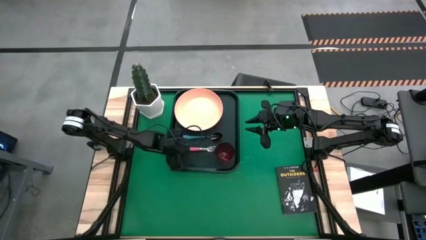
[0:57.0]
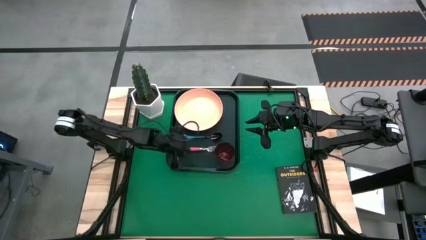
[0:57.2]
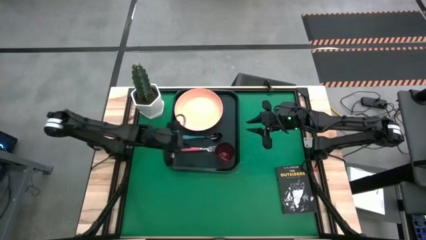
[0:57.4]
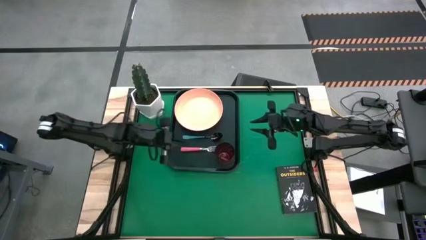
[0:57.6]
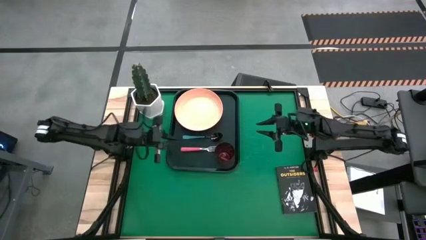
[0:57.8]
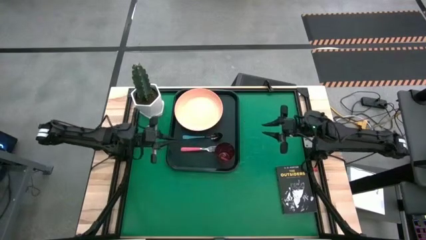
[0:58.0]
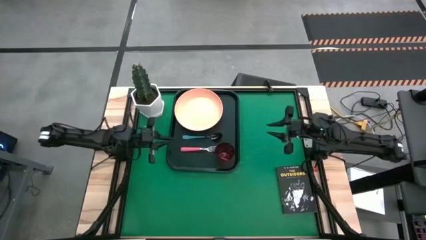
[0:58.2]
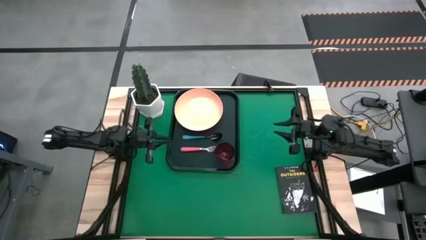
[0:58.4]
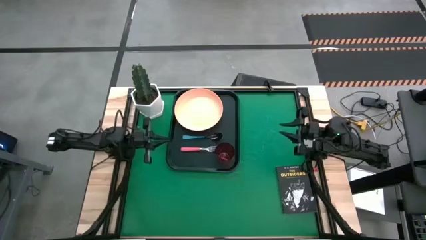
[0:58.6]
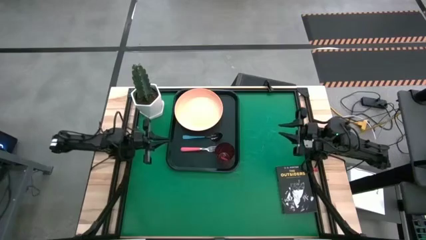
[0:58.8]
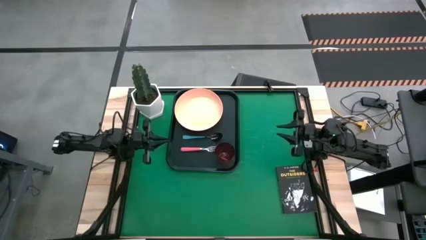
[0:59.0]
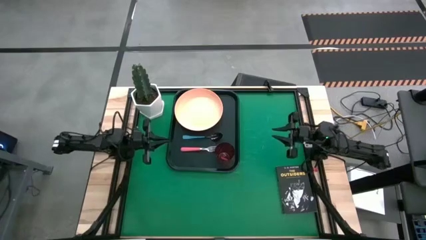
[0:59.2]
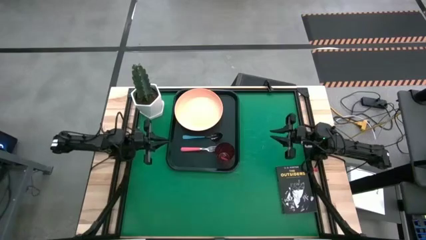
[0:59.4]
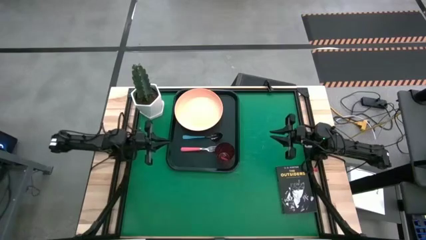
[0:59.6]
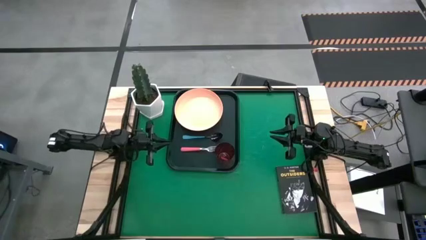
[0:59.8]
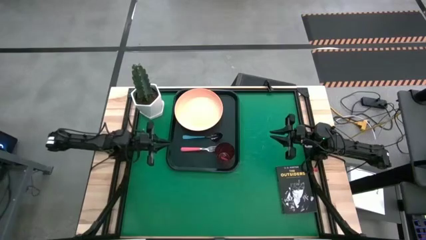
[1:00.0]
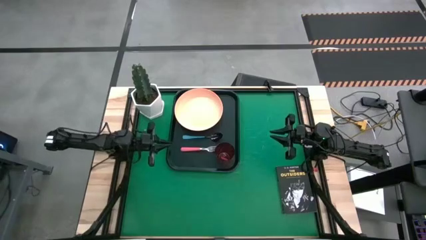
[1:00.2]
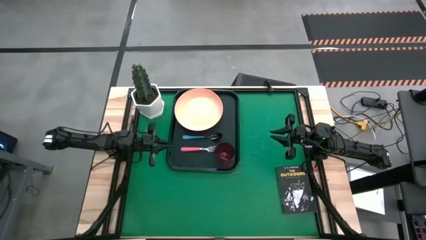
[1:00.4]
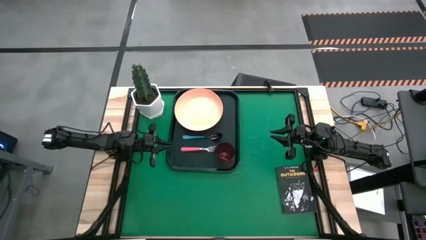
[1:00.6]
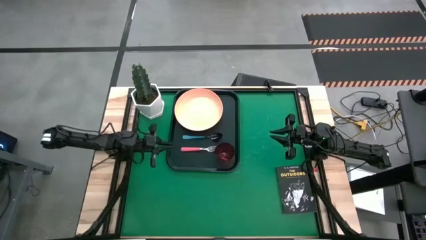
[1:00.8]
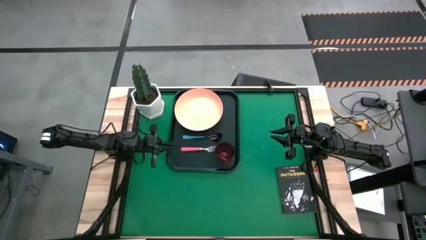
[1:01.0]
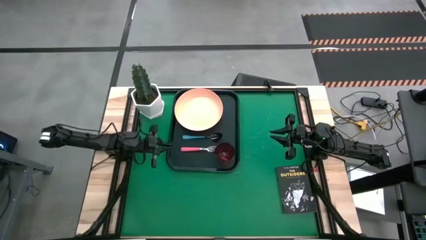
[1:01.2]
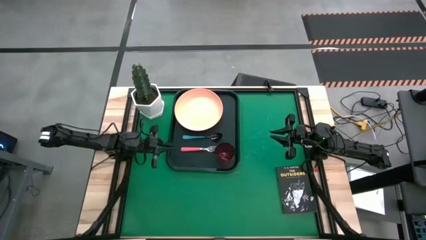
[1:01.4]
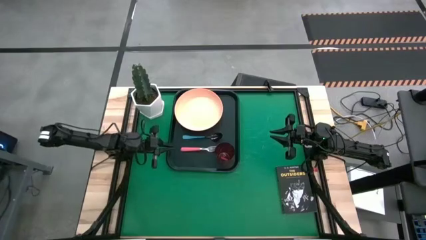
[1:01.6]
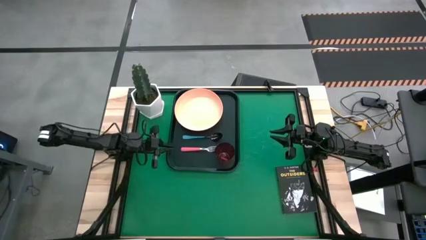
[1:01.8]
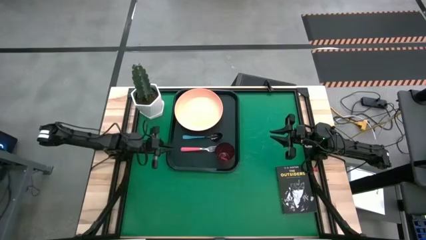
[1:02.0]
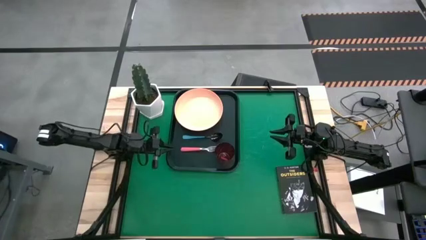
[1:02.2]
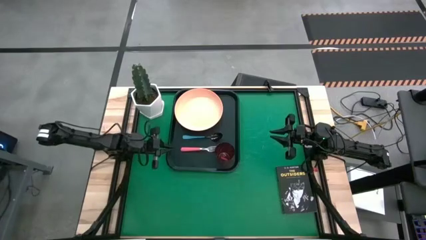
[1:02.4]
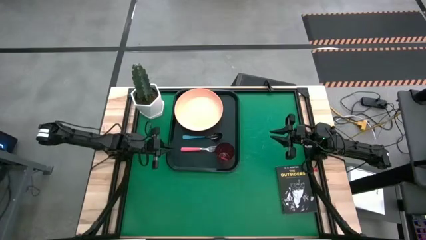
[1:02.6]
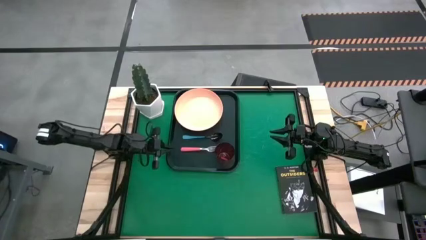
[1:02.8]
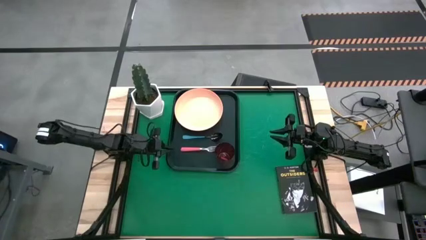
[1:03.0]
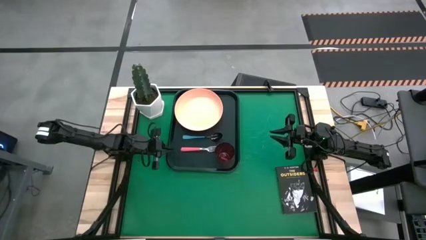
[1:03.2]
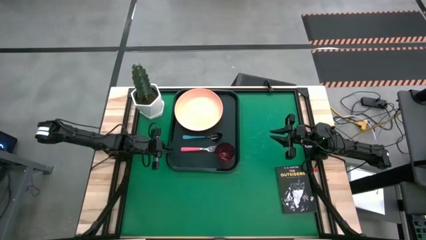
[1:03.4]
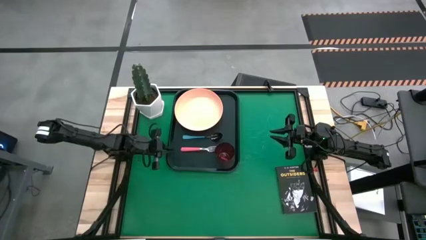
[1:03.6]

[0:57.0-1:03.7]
Task: Pick and place plate/cup/fork/spoon on tray
Return to Home Position

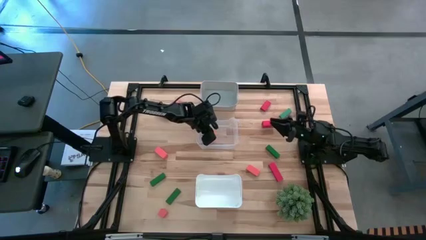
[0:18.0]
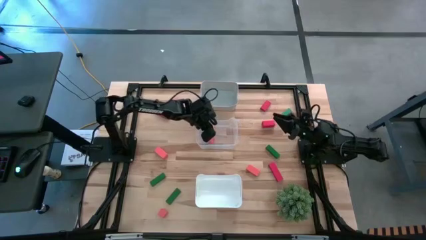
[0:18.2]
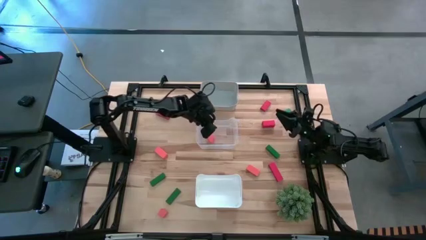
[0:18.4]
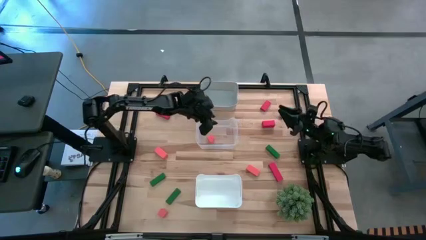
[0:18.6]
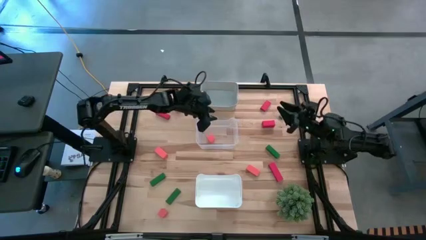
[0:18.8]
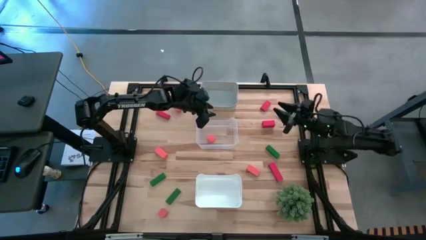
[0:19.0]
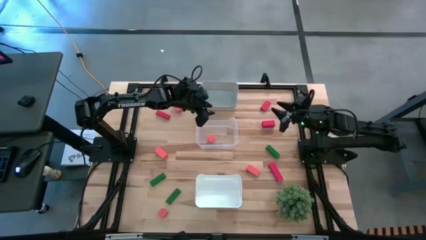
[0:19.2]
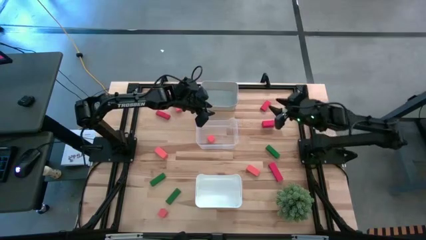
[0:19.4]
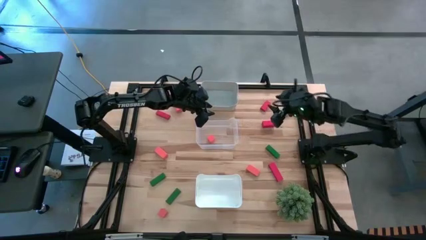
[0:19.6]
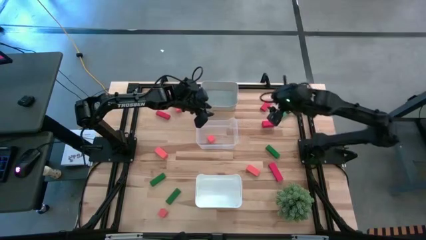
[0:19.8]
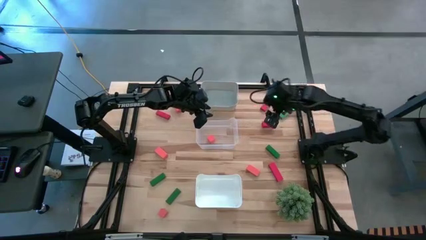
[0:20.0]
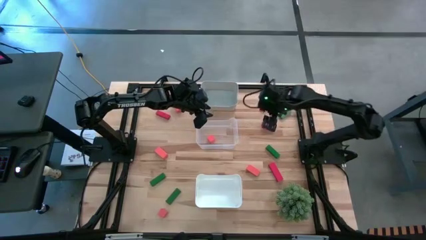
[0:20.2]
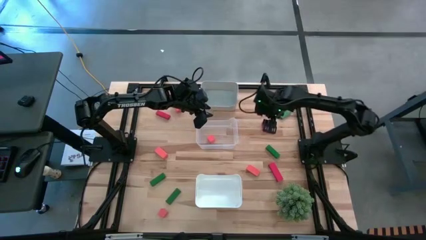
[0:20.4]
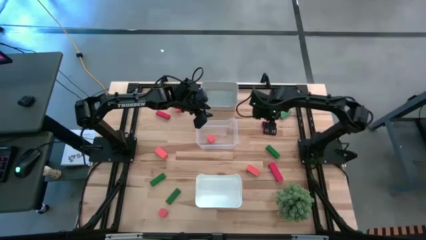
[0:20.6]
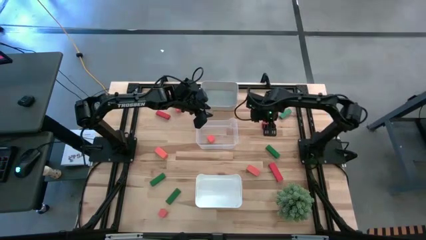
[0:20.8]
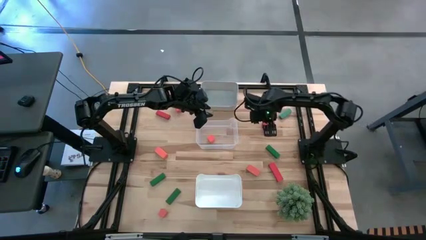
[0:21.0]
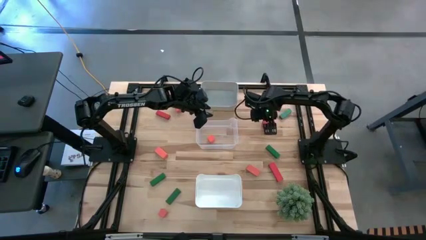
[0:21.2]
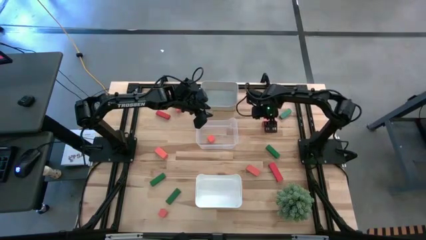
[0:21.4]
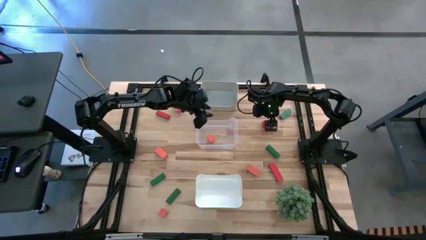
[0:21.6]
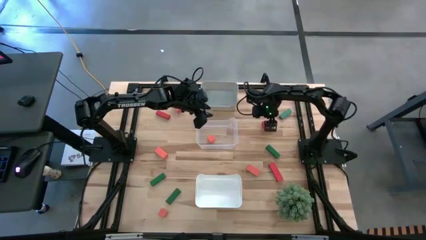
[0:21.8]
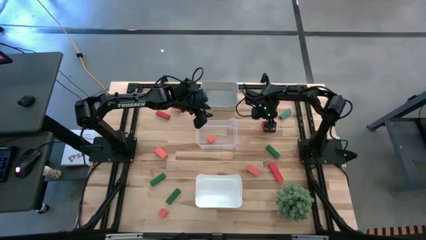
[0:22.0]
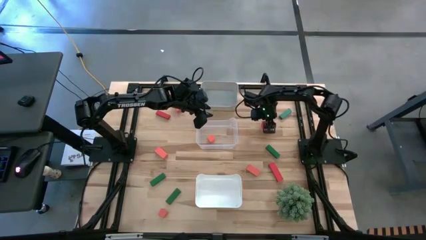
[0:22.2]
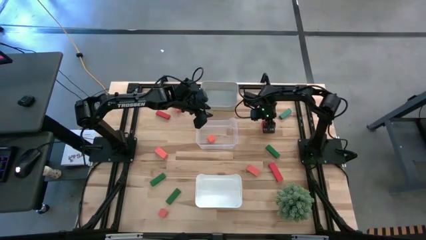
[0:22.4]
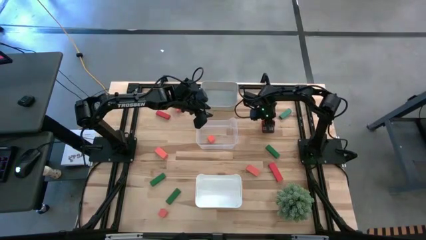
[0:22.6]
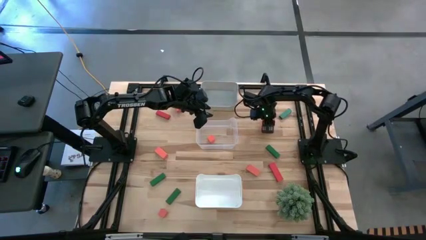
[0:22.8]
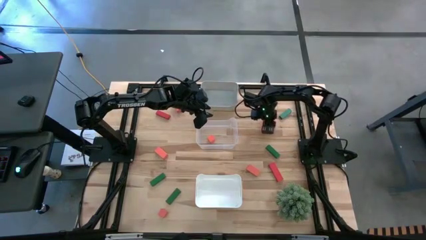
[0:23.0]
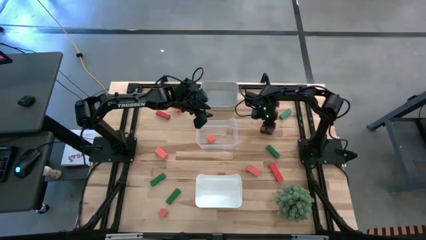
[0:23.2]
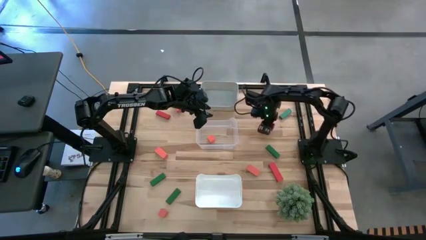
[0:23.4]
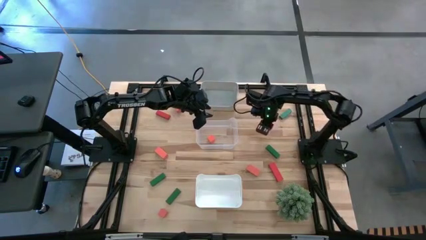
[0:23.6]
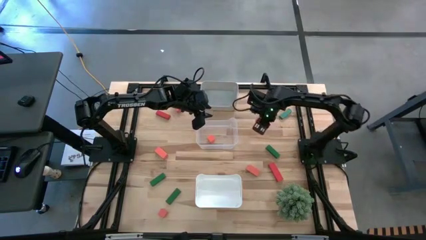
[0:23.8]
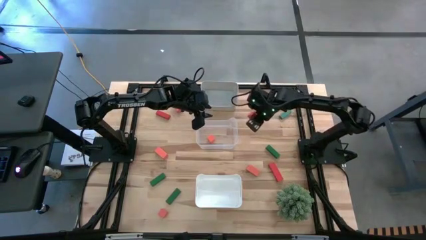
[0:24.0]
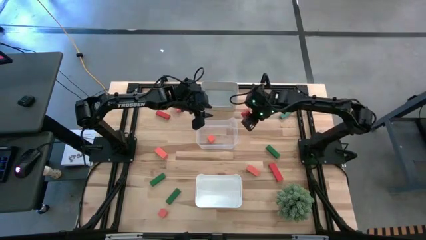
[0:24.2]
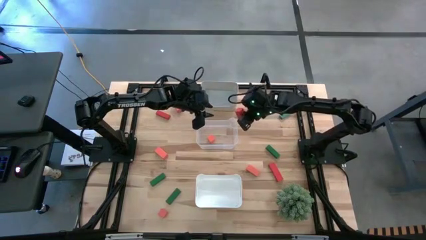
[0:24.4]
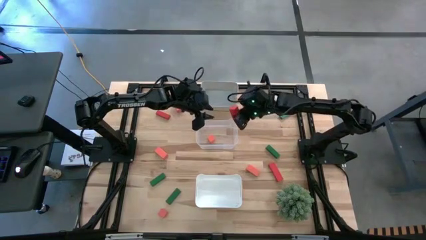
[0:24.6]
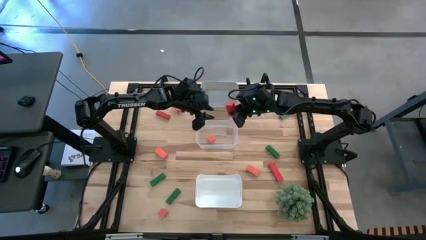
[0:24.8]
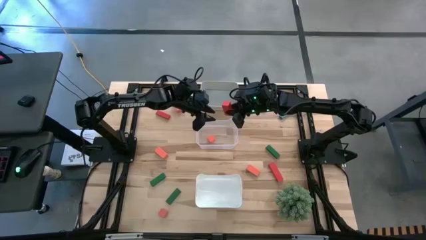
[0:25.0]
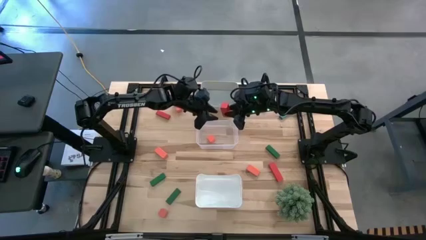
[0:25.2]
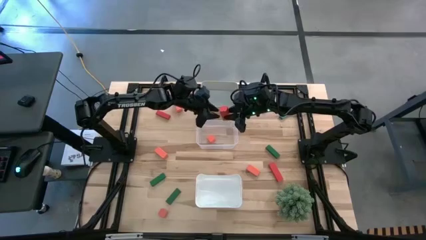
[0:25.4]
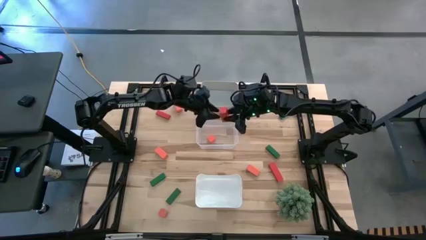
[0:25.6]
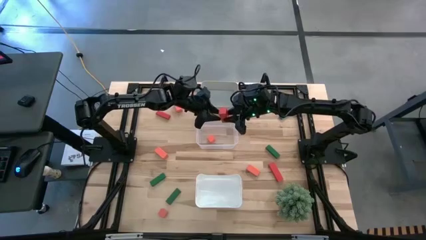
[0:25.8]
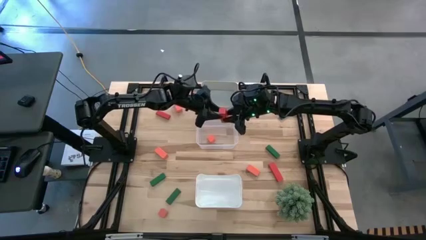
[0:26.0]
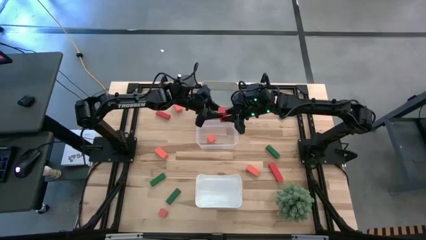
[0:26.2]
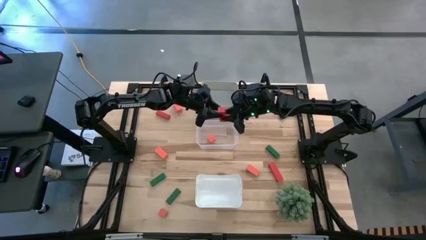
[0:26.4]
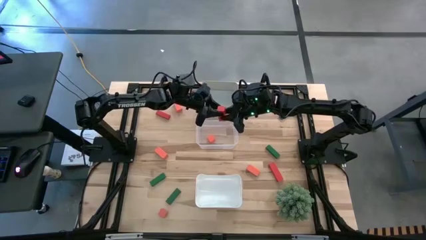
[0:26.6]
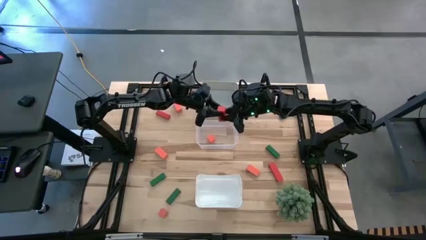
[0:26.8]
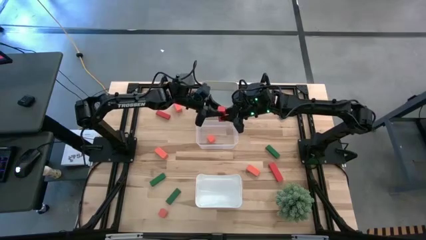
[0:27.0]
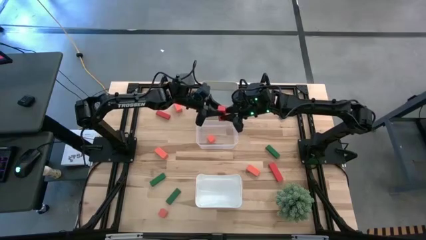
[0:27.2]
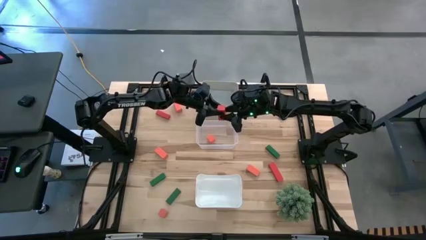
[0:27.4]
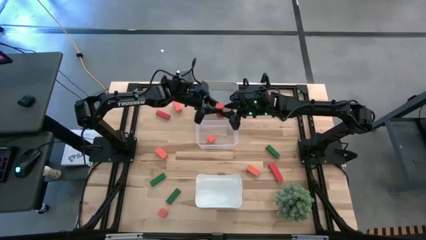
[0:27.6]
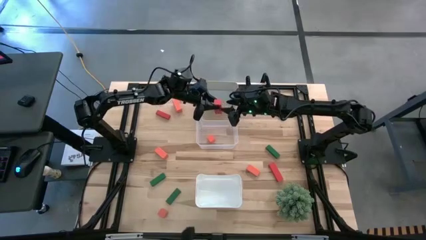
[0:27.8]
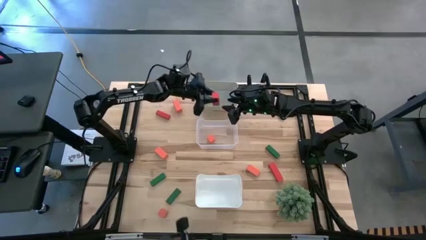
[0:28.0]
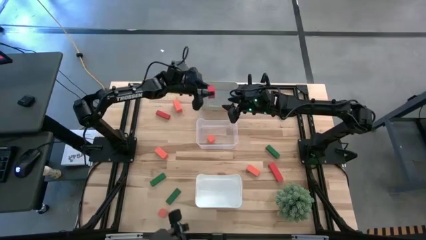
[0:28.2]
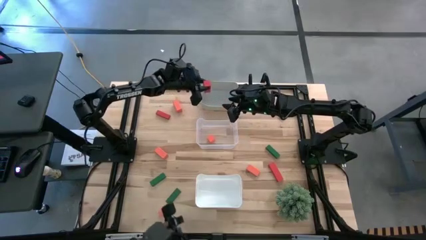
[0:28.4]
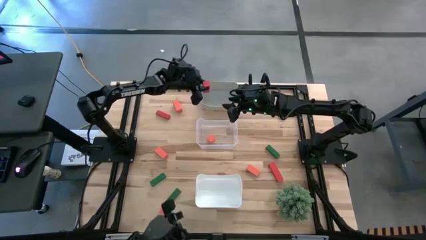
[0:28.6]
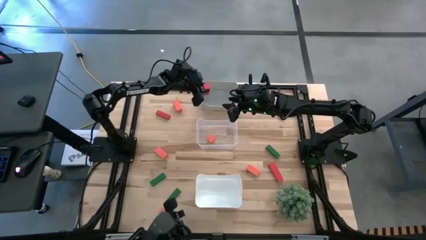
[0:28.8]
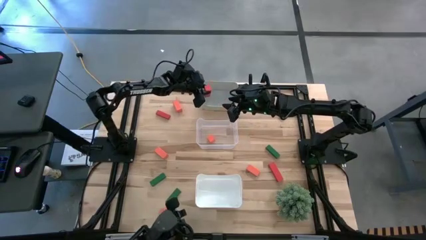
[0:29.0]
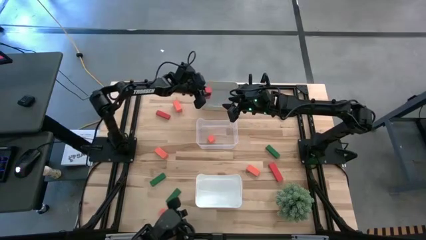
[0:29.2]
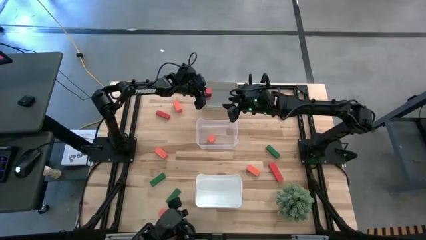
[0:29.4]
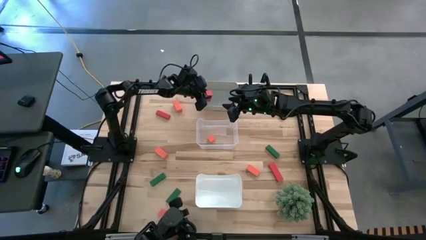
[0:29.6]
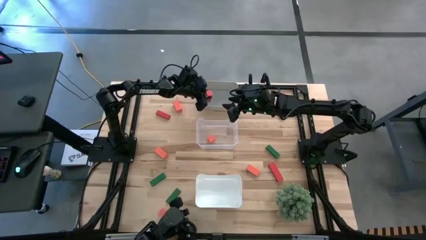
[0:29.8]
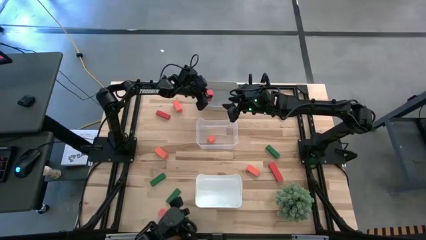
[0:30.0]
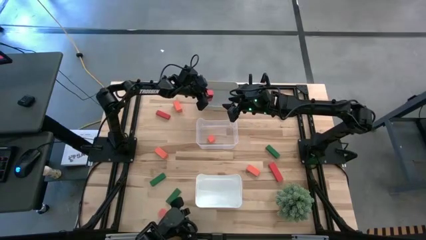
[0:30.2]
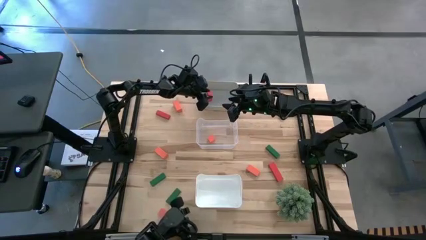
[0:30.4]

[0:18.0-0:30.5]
Task: Sort & place blocks by color
Put the center right red block into the gray bin
